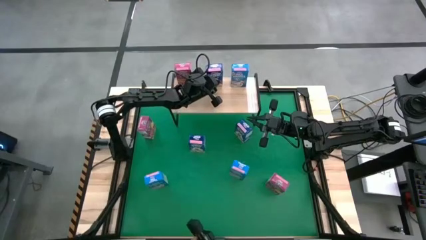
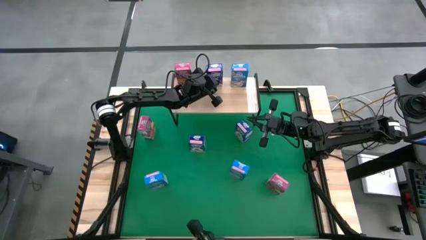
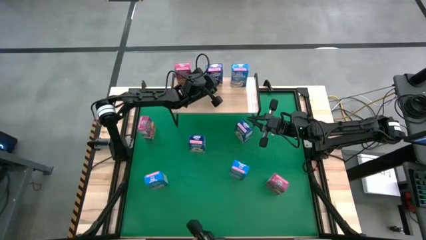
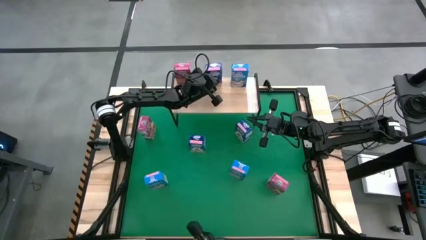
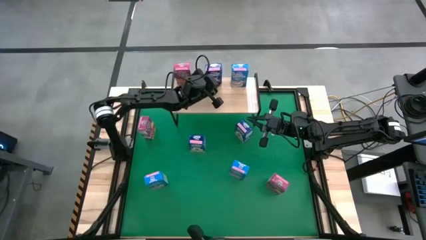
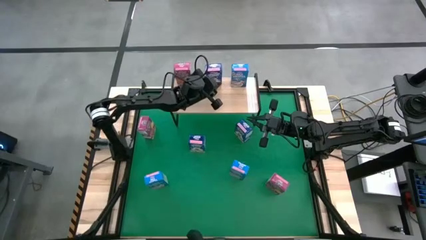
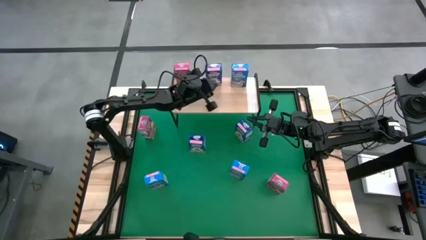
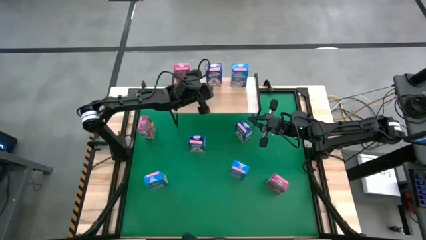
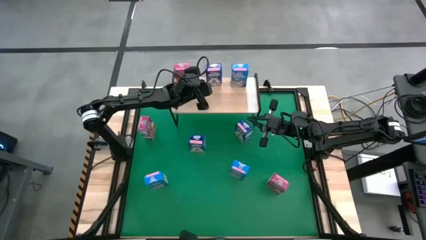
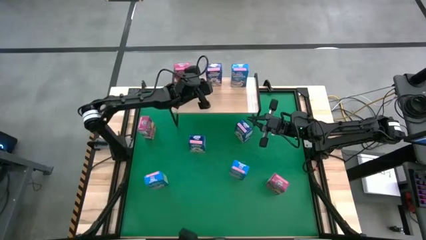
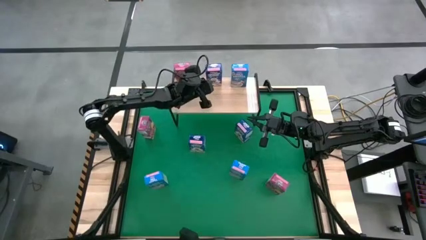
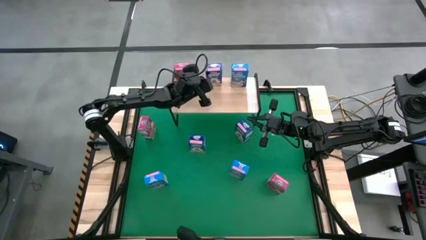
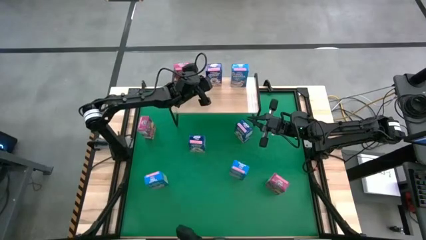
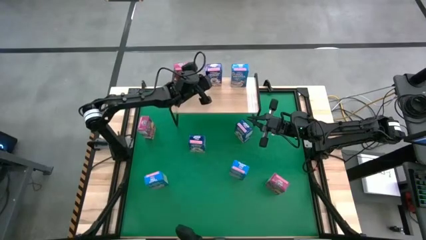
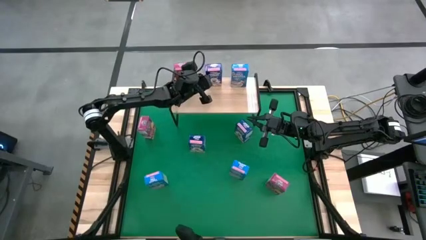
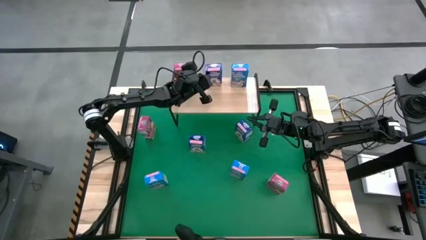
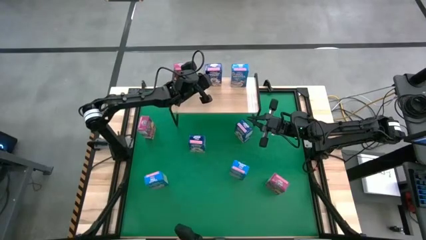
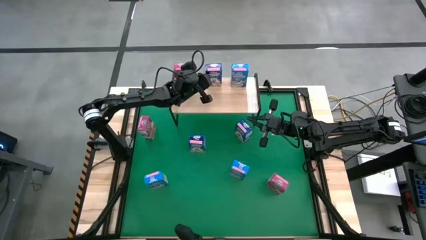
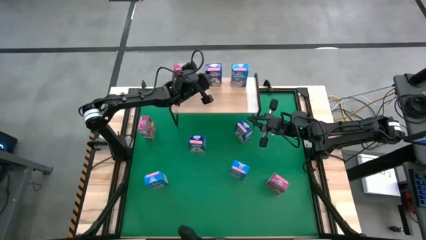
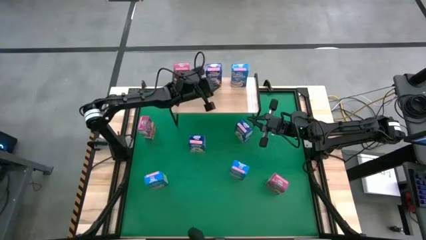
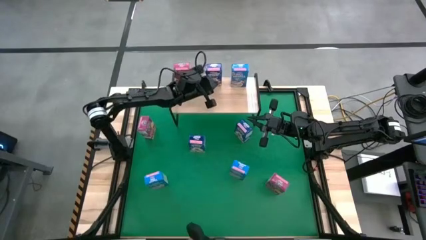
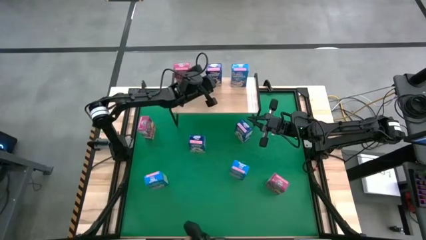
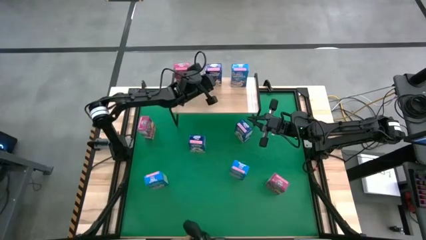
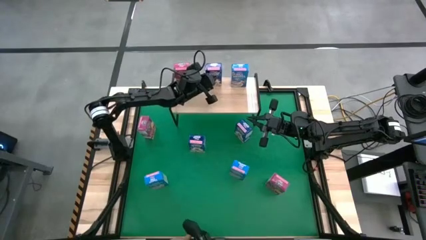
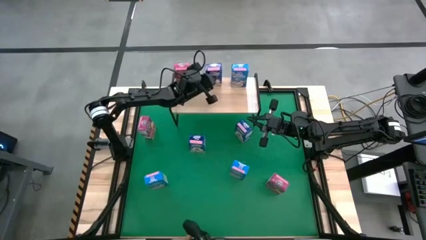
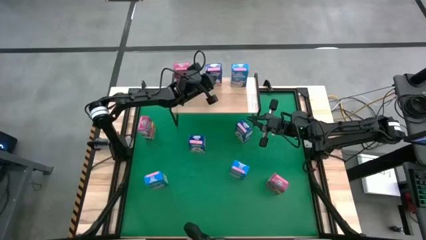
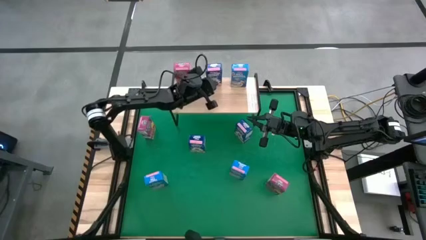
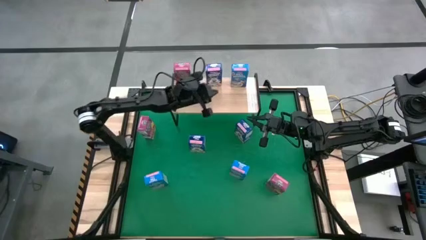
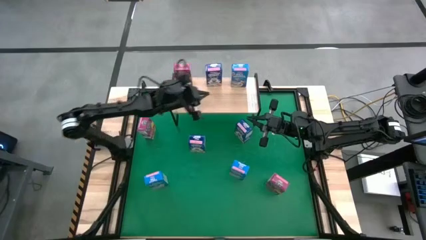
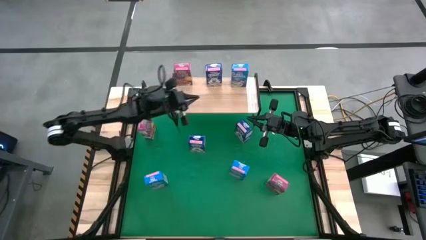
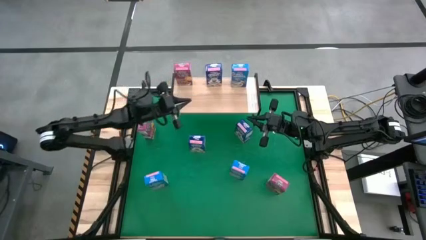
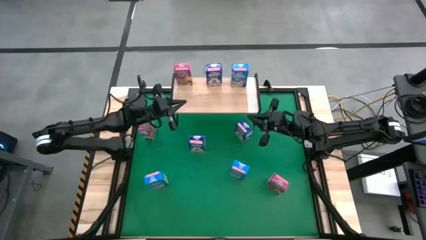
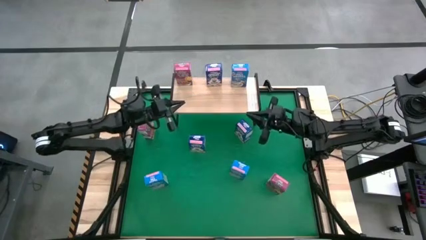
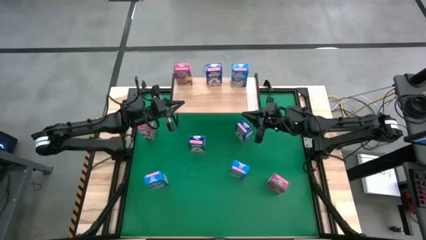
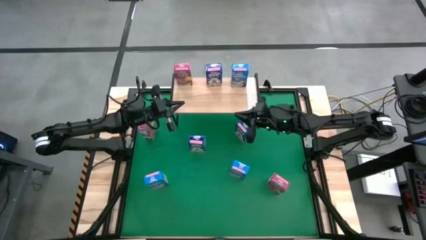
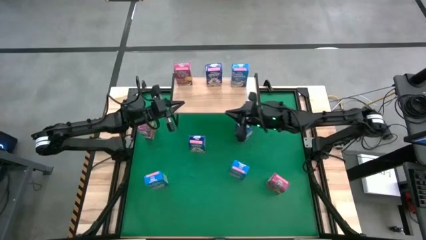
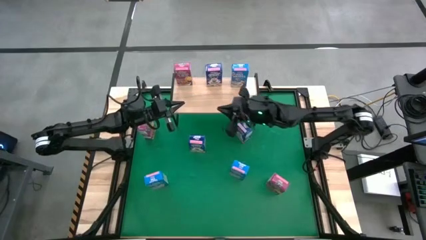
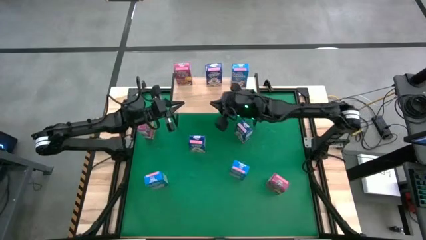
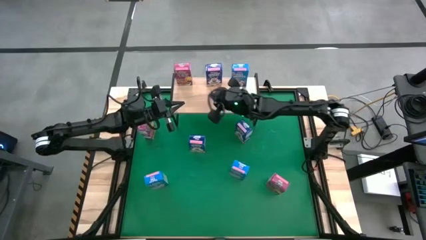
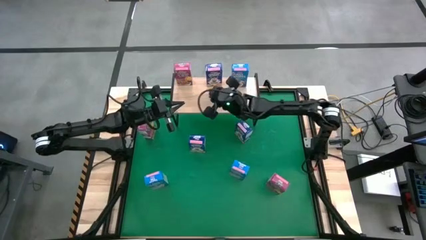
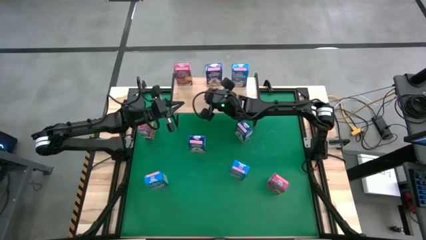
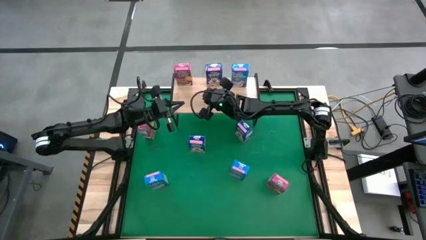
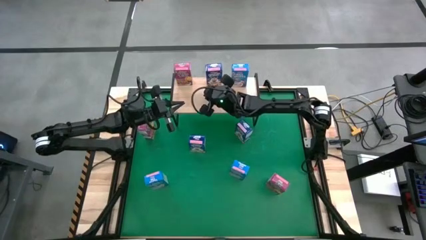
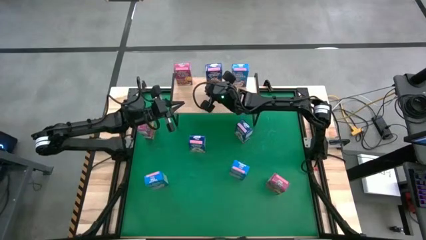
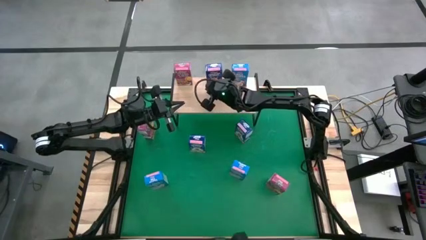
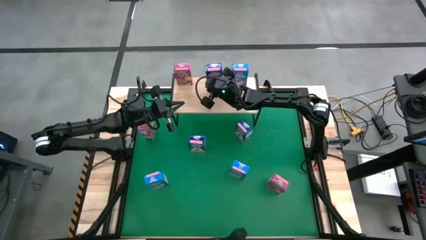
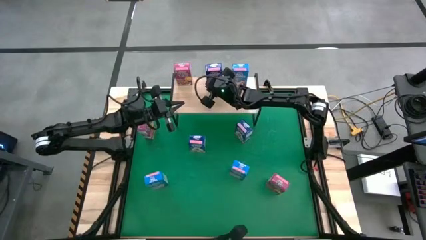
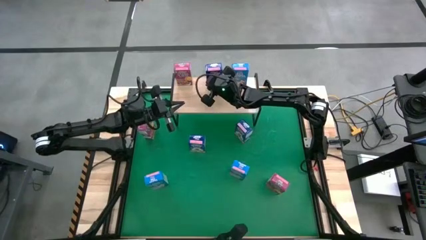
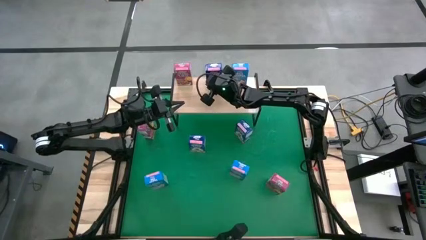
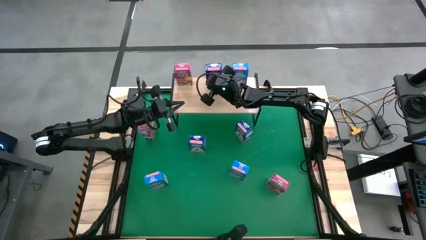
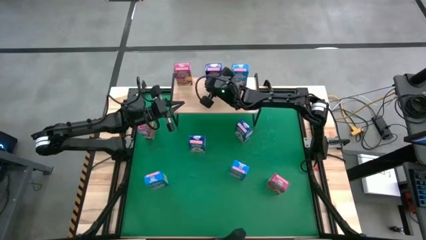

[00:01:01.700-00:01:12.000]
Task: Stack cereal on shelf
Adjust the cereal boxes on the shelf

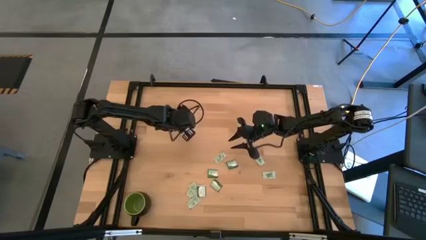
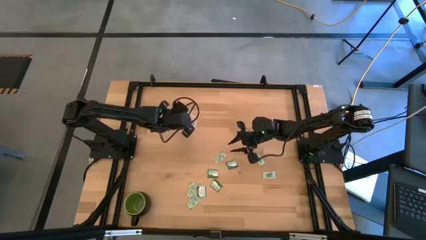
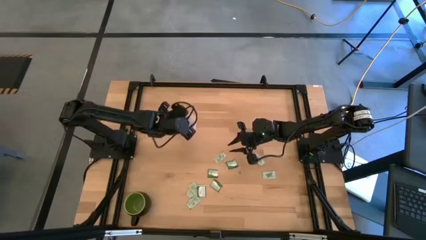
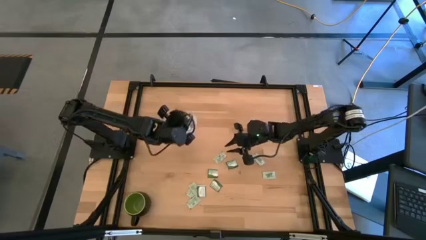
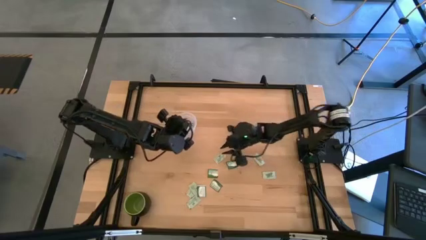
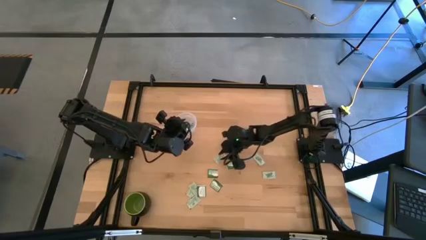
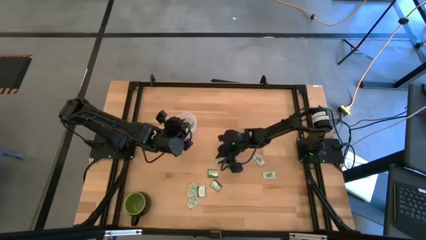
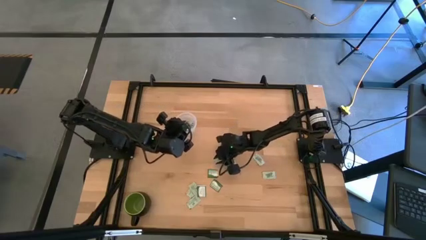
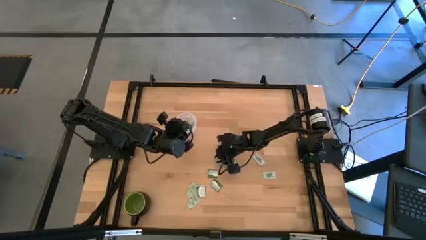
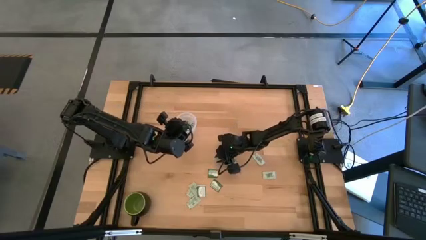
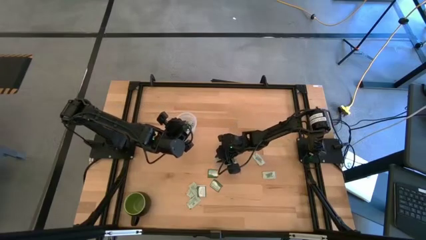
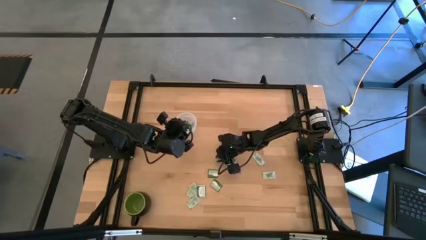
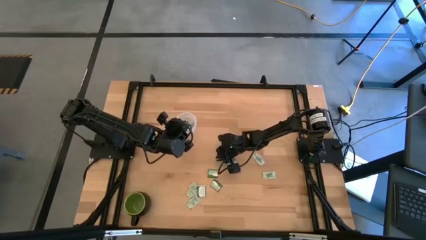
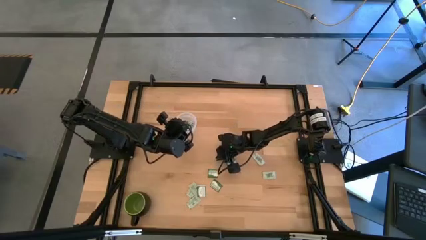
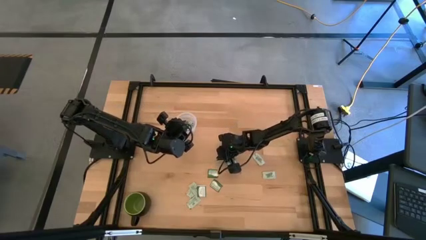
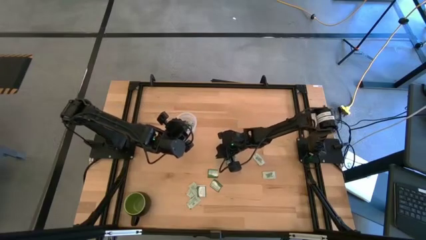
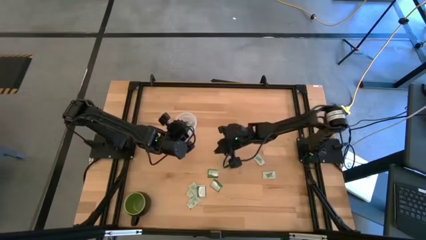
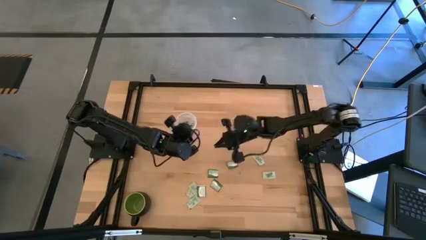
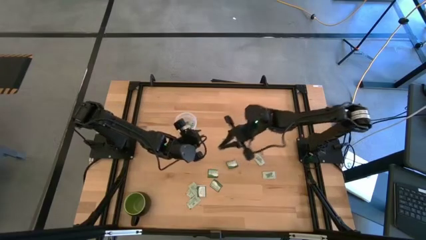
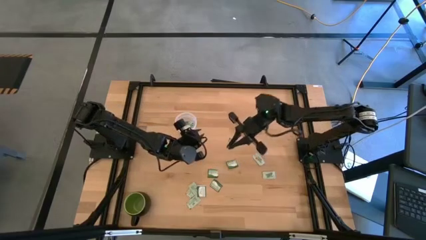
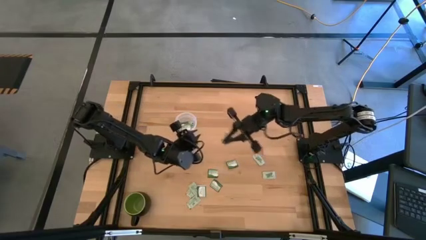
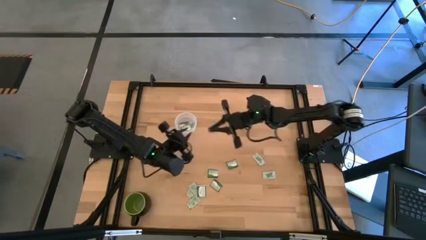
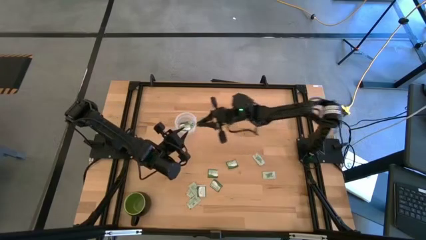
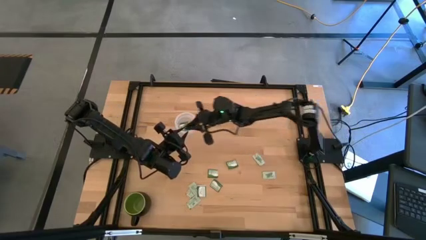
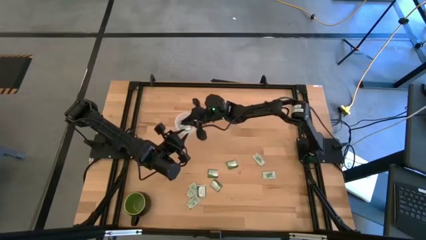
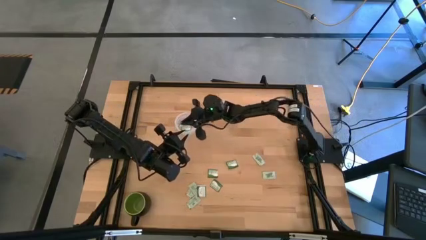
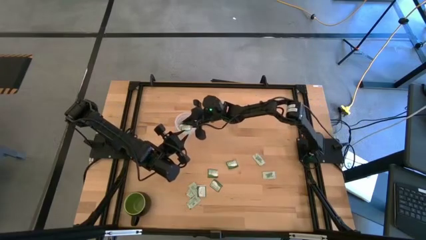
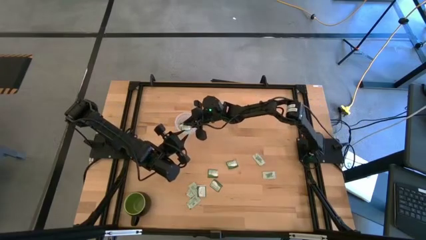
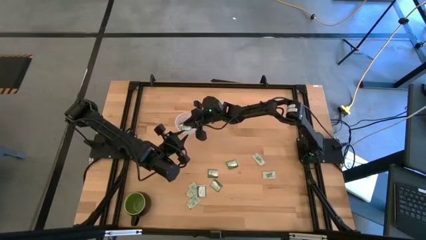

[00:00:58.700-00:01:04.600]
Task: Pick and place Stevia / Truvia into bins
Put the light green stevia packet into the transparent container
